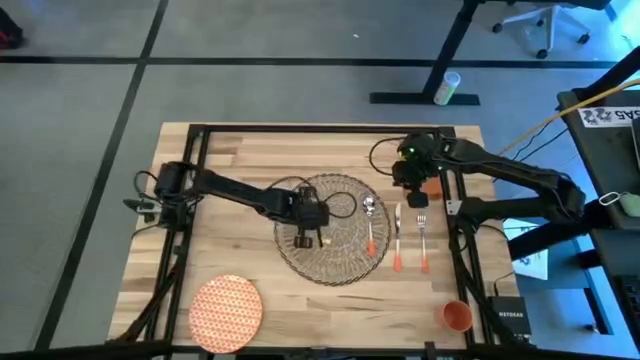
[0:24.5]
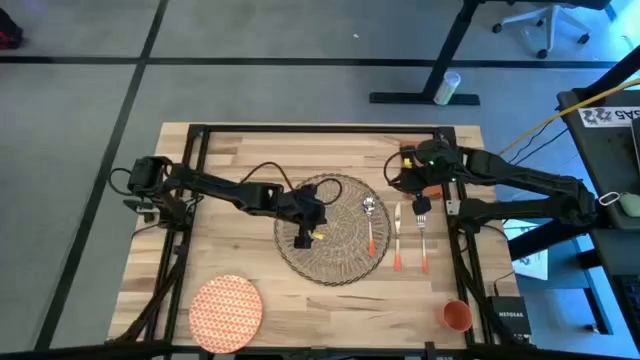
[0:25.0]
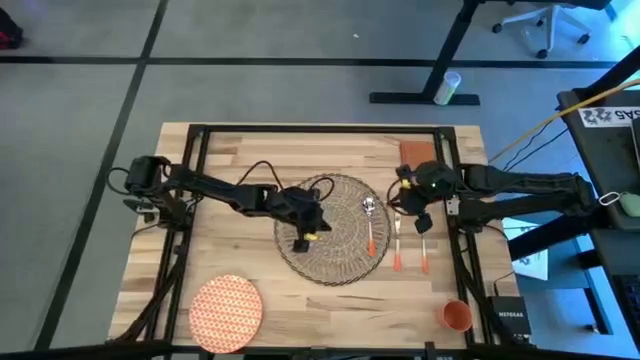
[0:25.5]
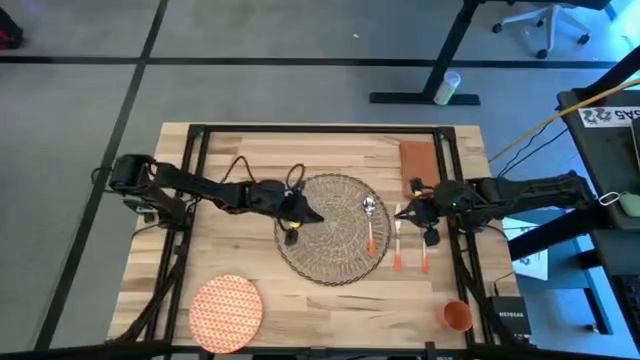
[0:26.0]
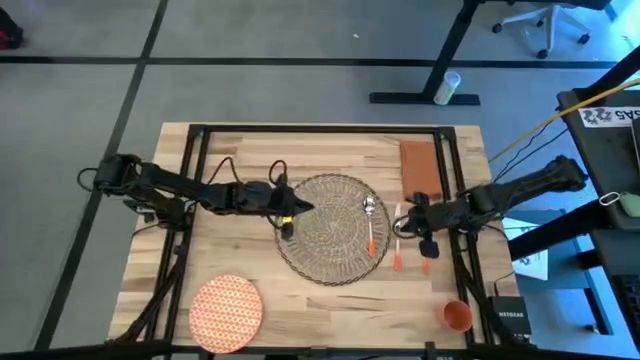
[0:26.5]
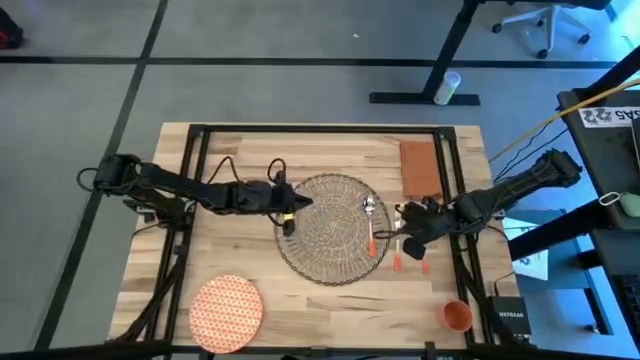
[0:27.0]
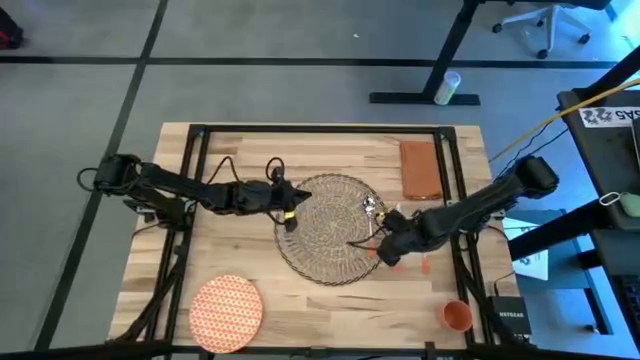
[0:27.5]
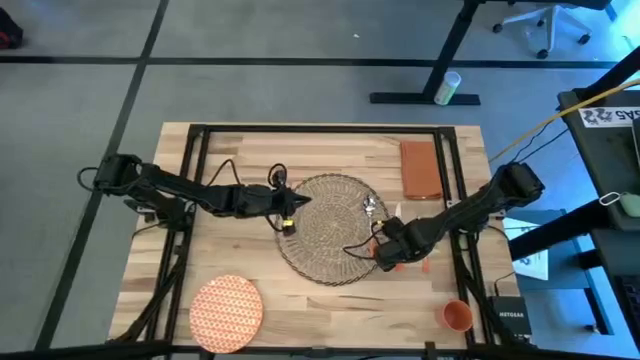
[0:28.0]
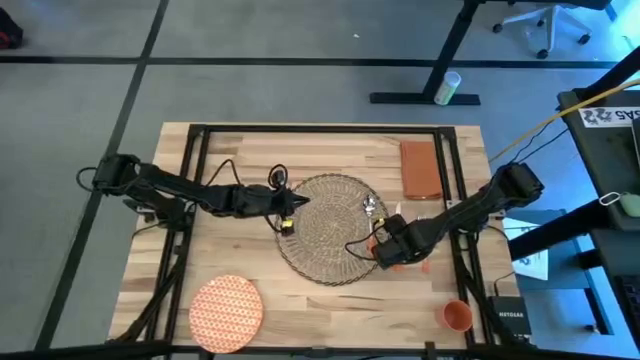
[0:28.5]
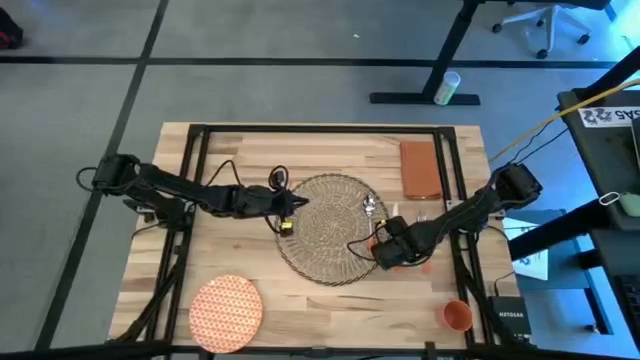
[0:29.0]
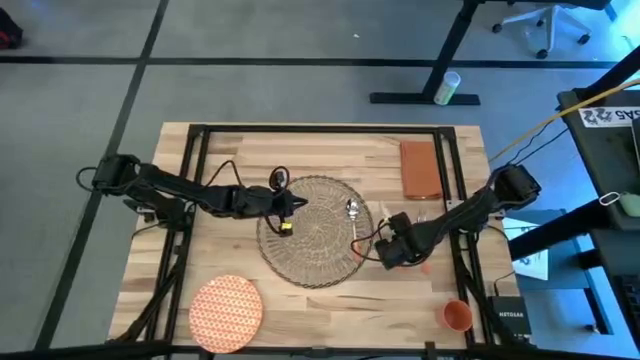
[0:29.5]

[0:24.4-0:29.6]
Task: Set table place
Put the knife on the brown woven placemat to the left of the spoon

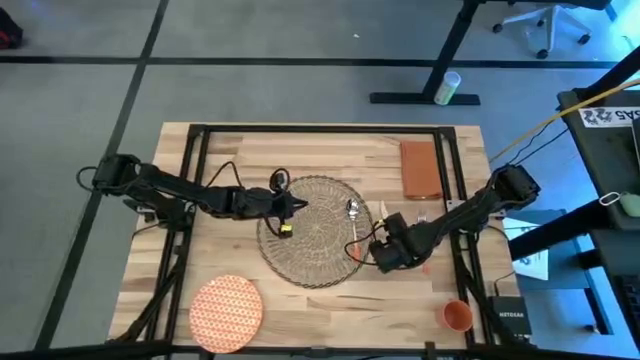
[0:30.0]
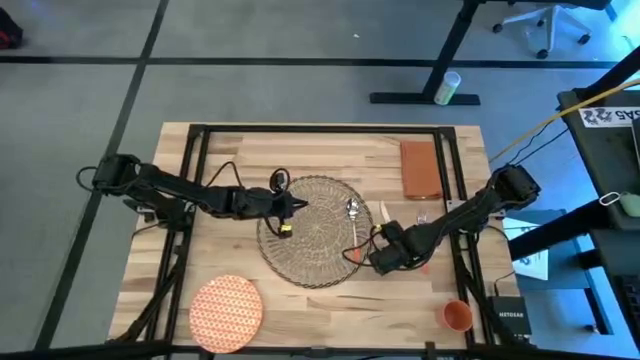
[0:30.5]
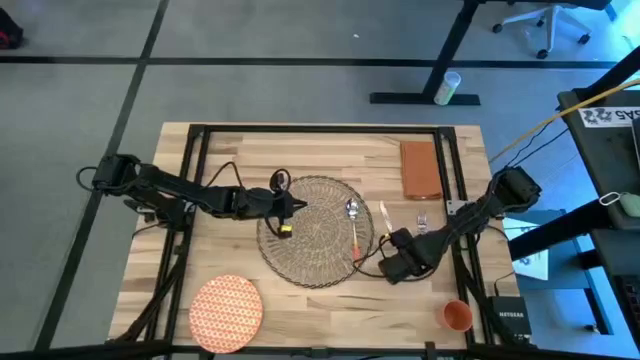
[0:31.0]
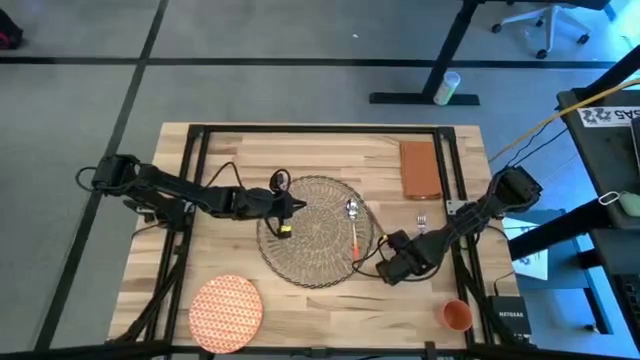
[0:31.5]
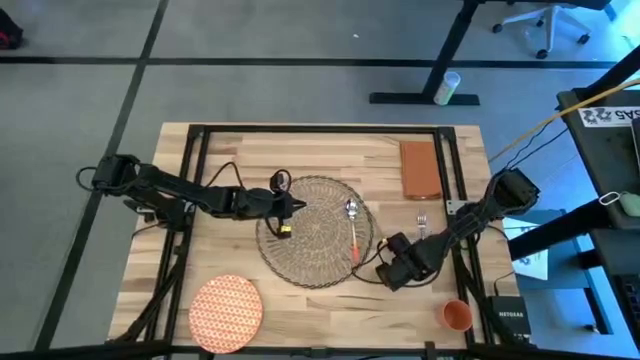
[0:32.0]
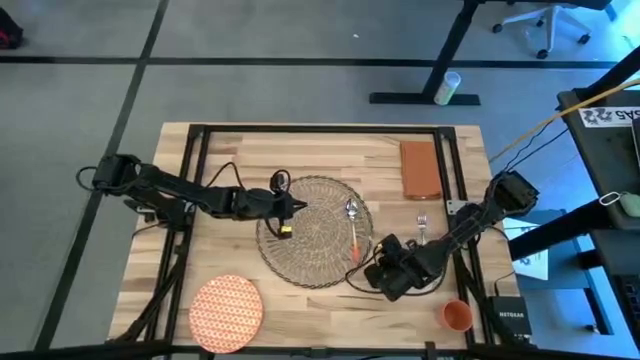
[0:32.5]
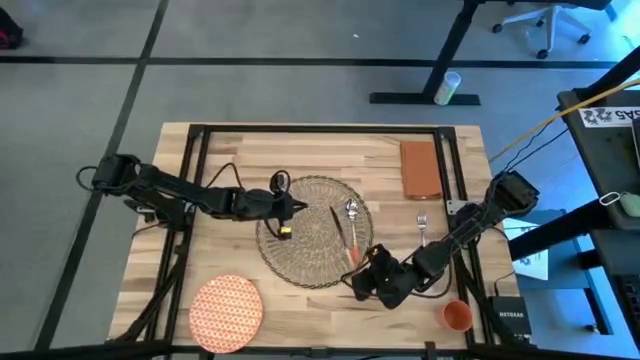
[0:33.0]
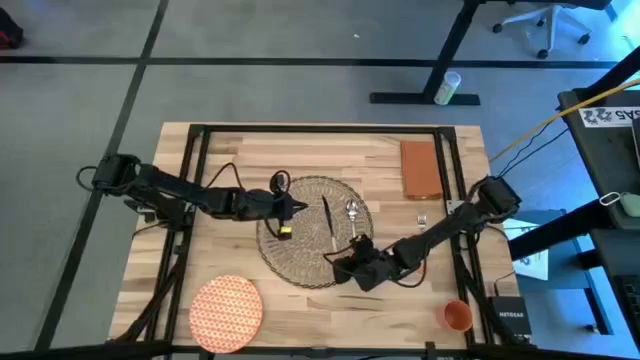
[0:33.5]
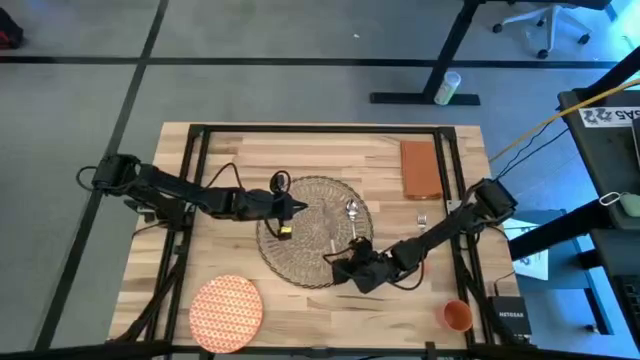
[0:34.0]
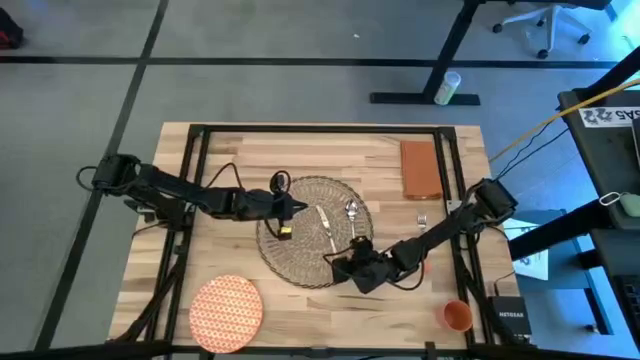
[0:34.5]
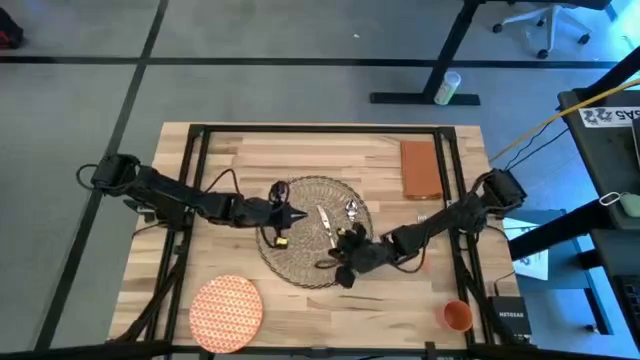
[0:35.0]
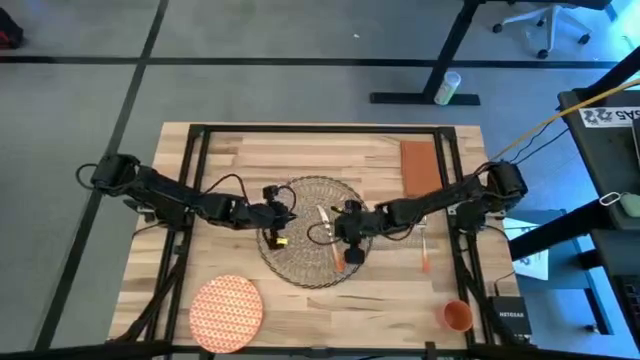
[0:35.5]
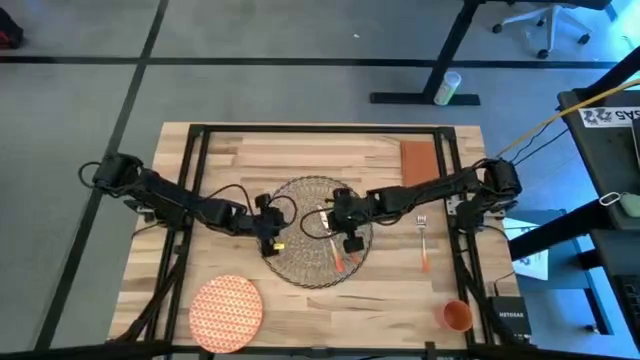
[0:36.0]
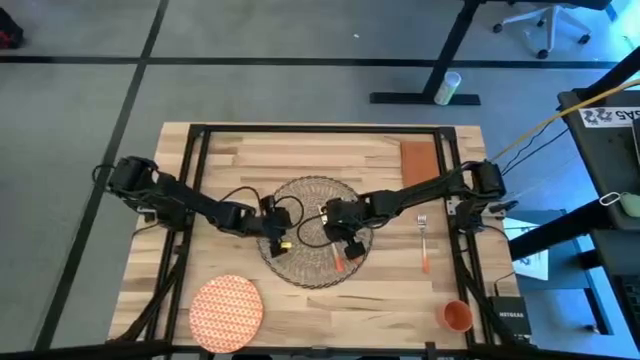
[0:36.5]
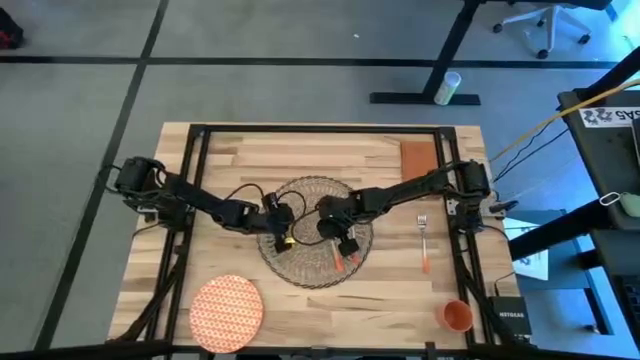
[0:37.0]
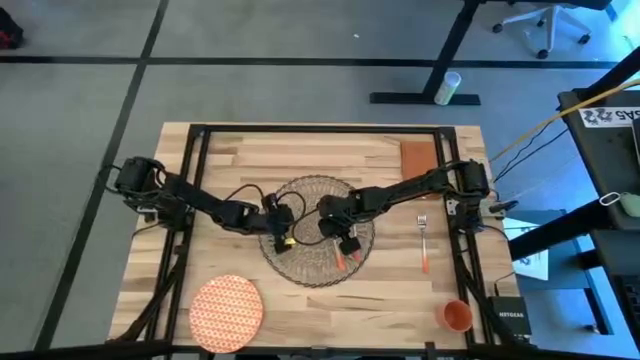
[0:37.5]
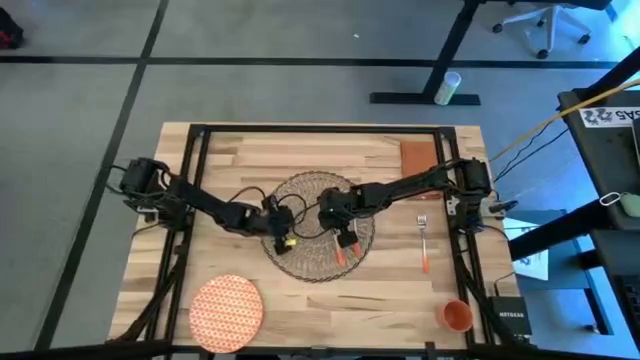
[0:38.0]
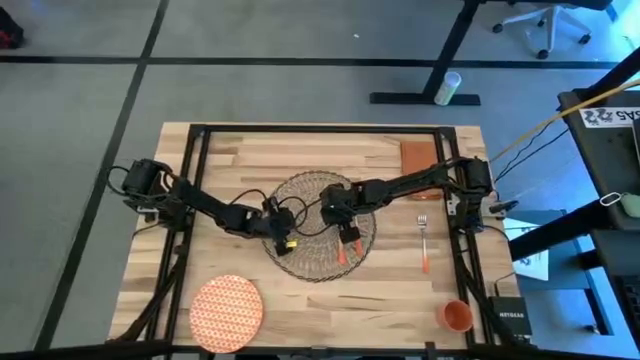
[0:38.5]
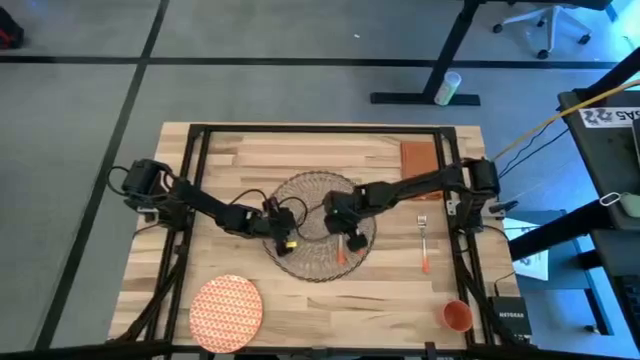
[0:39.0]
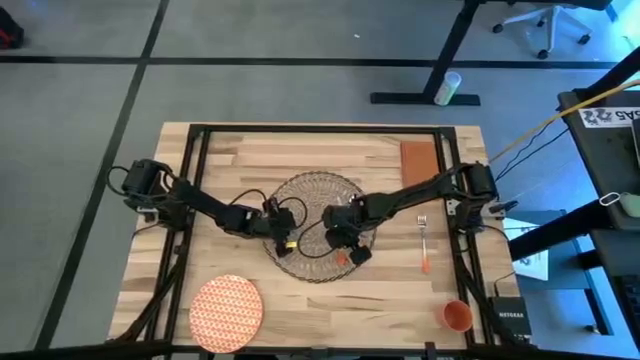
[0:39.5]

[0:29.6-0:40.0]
Put the knife on the brown woven placemat to the left of the spoon

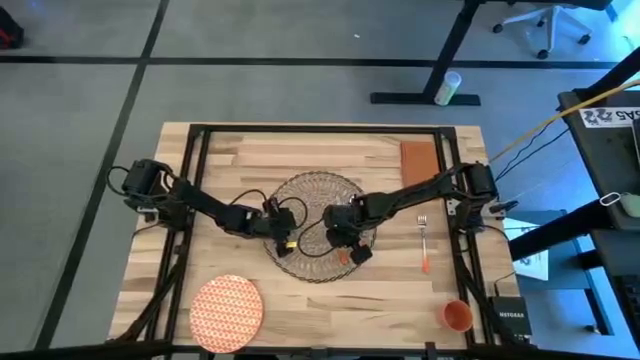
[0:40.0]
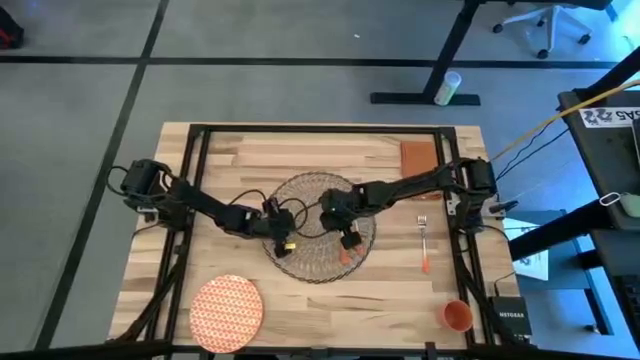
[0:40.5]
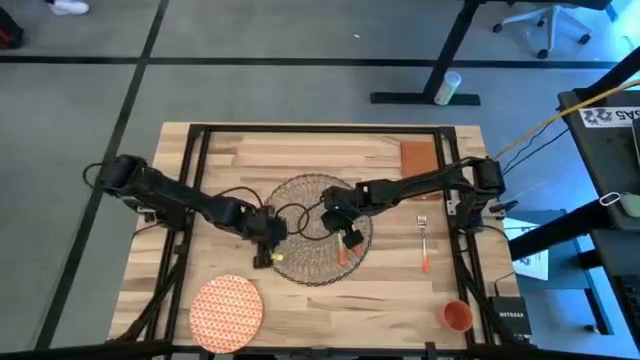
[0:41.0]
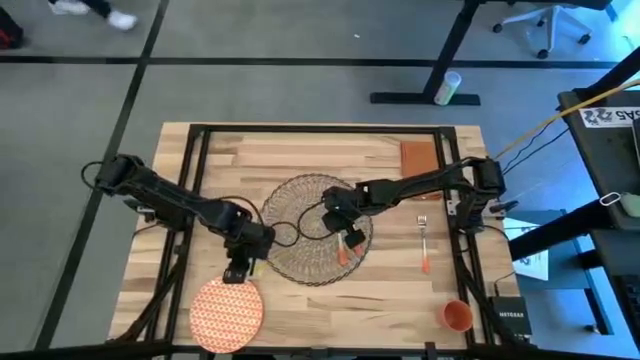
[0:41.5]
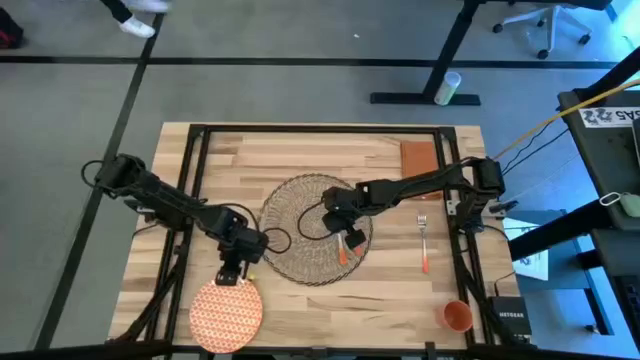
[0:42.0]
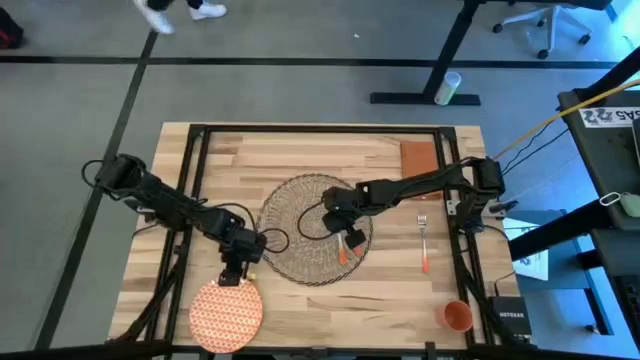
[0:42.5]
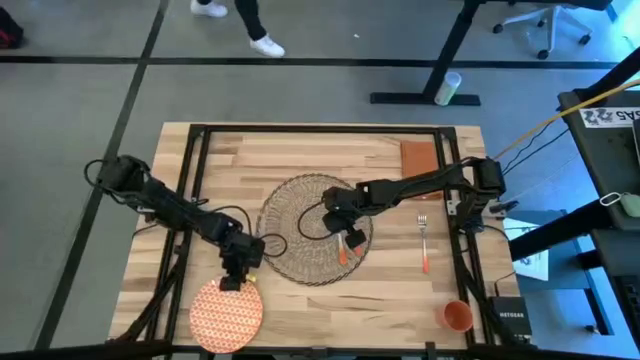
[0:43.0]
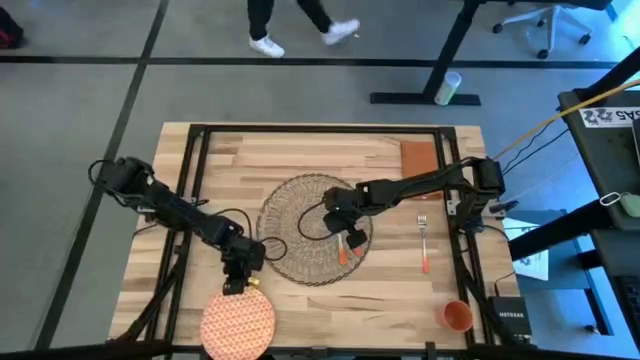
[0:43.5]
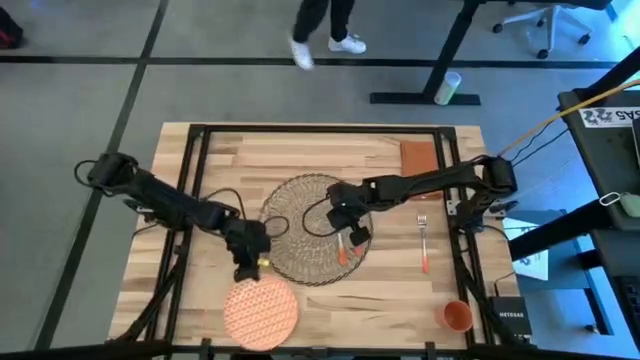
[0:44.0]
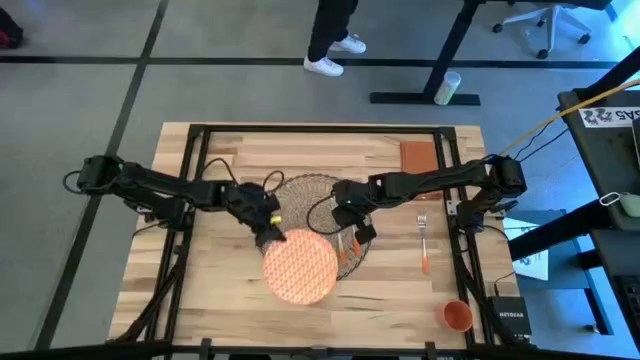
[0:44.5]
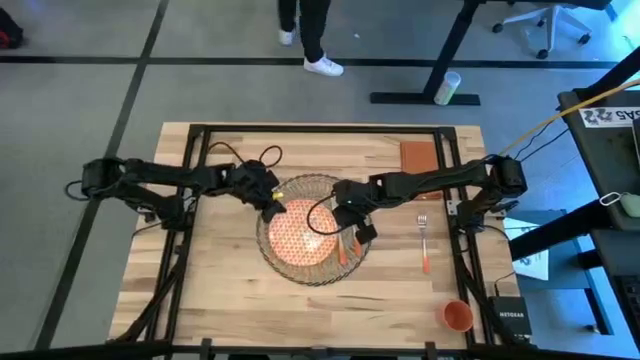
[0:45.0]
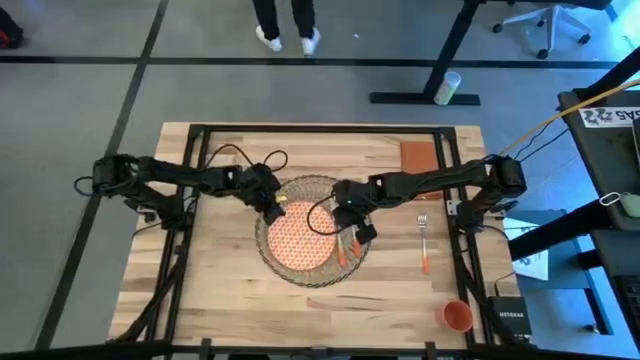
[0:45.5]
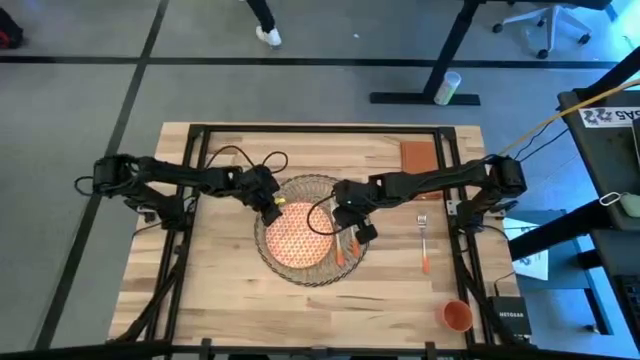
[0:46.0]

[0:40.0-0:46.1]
Put the orange plate on the brown woven placemat to the left of the knife
